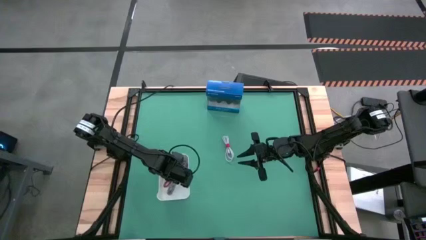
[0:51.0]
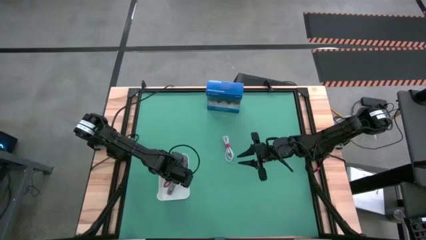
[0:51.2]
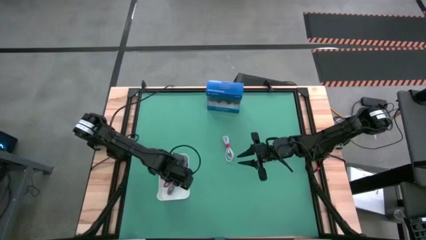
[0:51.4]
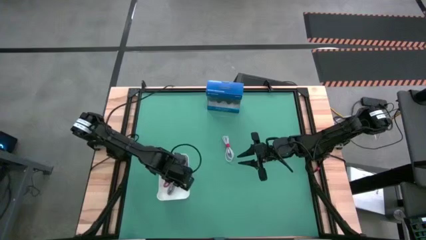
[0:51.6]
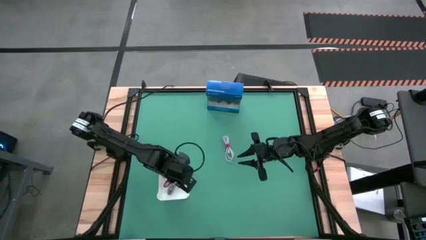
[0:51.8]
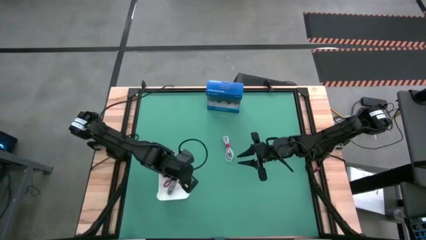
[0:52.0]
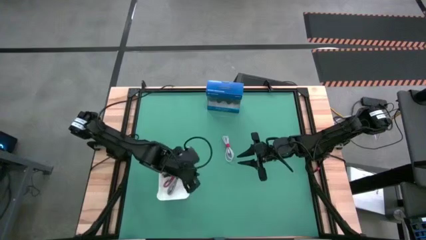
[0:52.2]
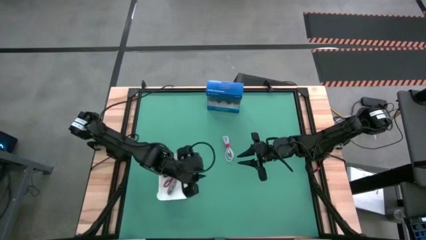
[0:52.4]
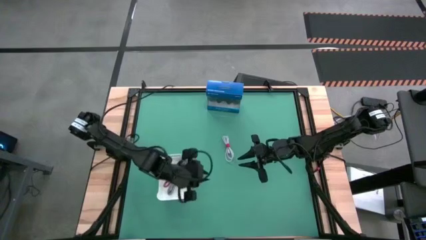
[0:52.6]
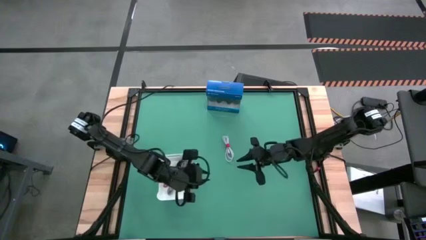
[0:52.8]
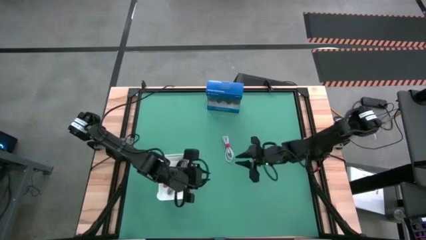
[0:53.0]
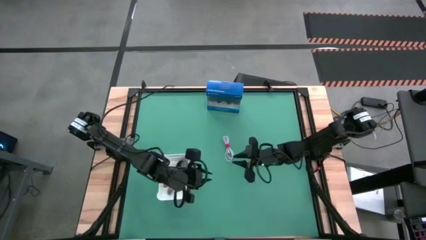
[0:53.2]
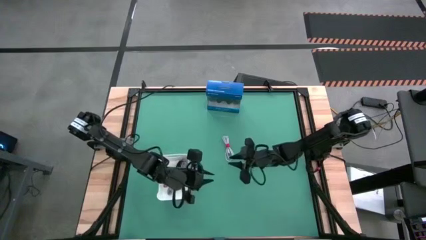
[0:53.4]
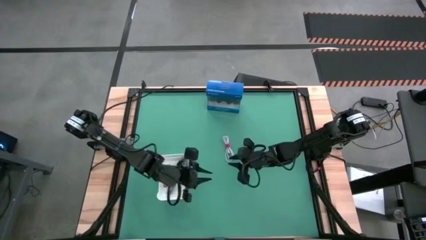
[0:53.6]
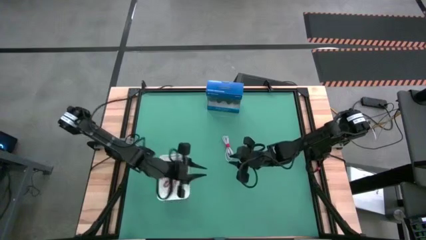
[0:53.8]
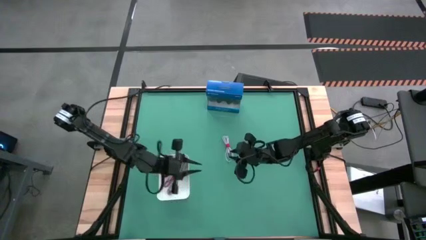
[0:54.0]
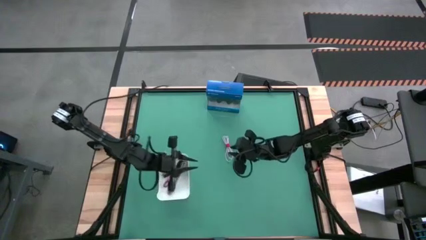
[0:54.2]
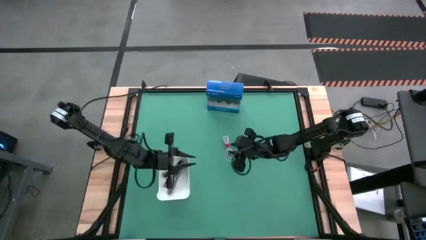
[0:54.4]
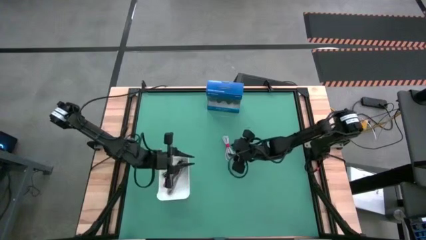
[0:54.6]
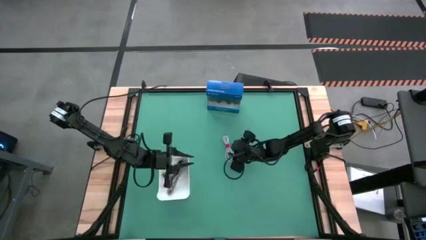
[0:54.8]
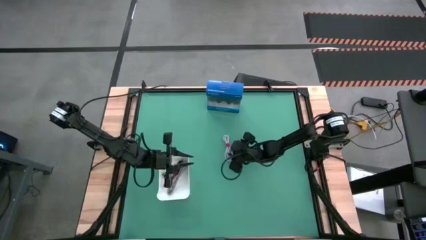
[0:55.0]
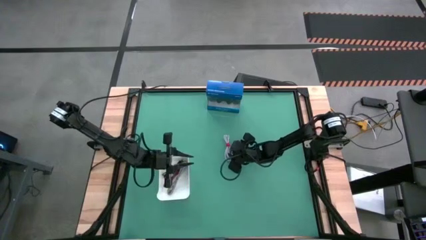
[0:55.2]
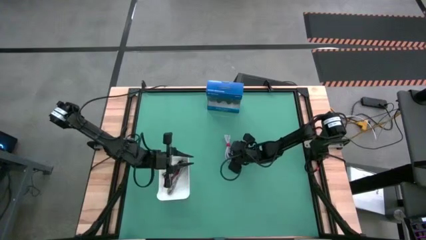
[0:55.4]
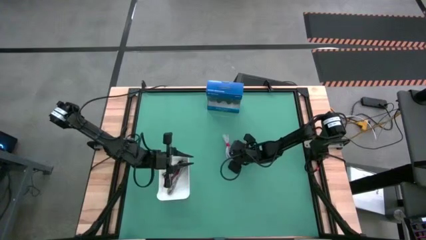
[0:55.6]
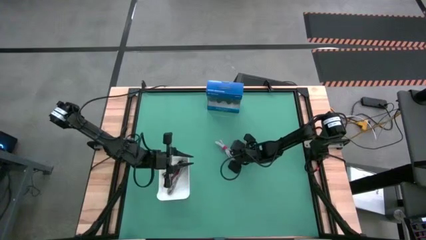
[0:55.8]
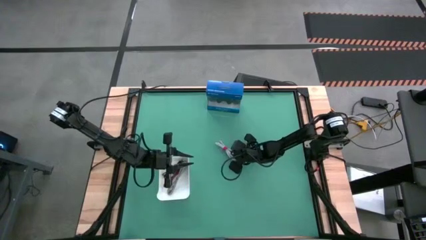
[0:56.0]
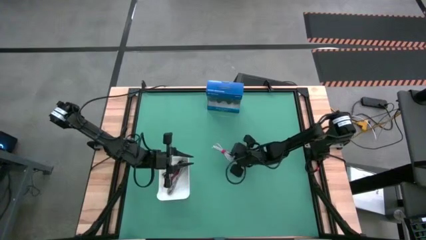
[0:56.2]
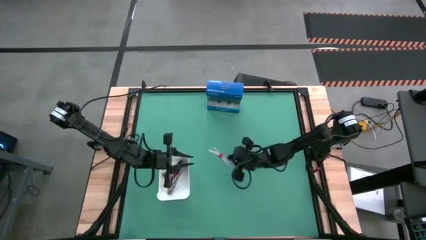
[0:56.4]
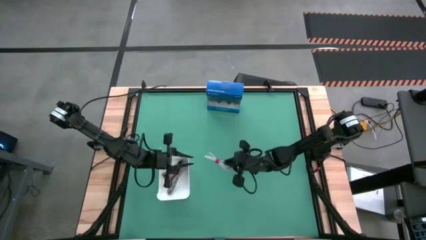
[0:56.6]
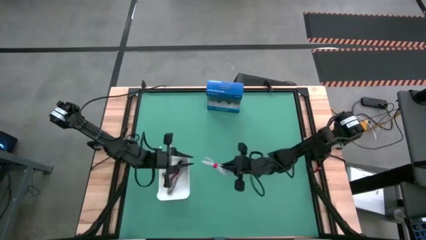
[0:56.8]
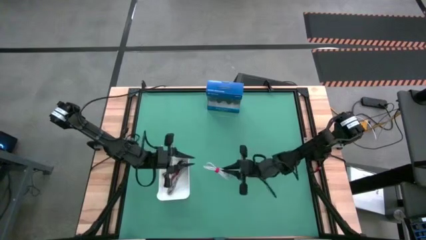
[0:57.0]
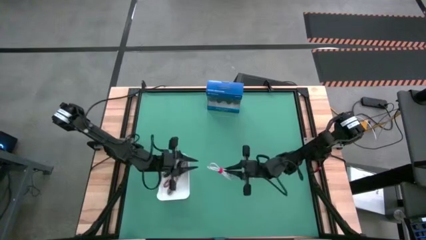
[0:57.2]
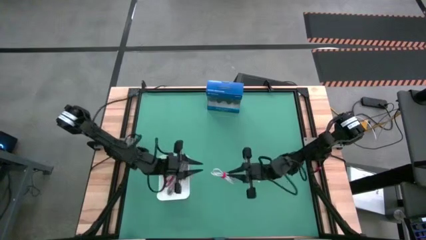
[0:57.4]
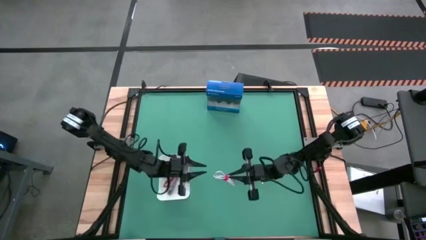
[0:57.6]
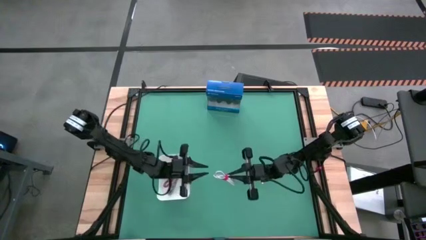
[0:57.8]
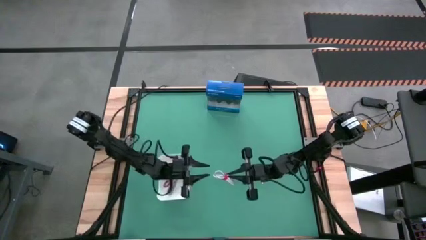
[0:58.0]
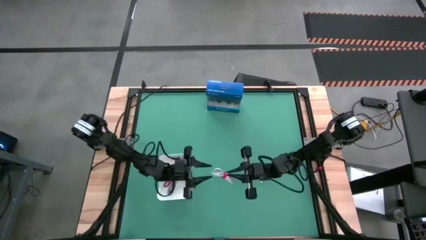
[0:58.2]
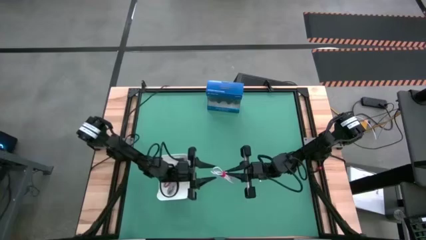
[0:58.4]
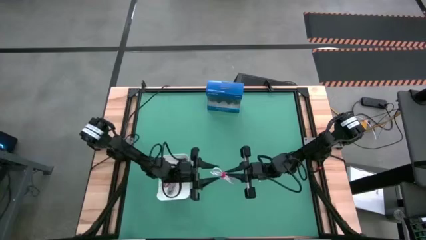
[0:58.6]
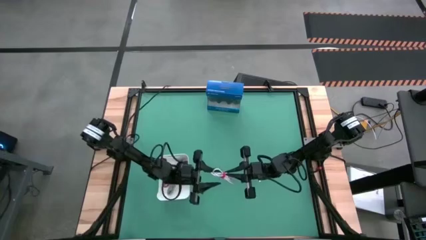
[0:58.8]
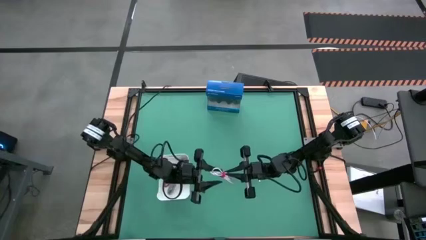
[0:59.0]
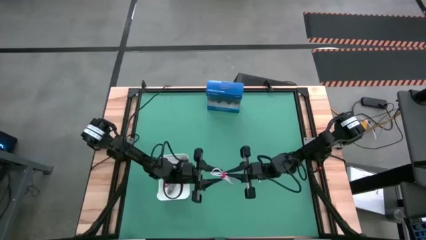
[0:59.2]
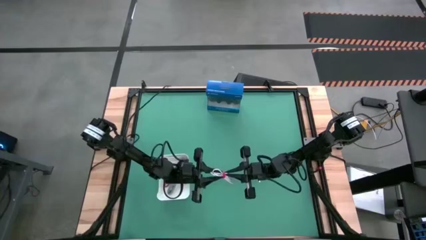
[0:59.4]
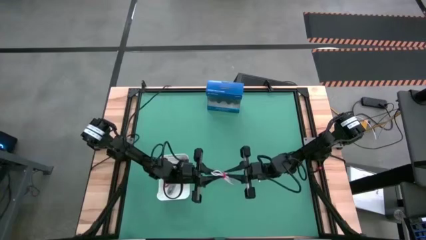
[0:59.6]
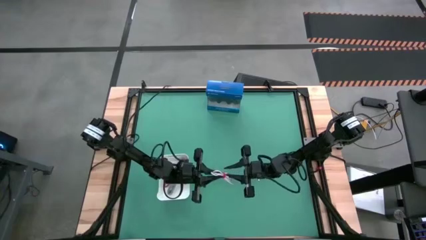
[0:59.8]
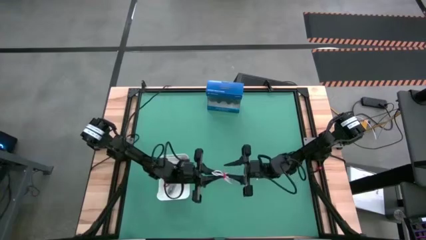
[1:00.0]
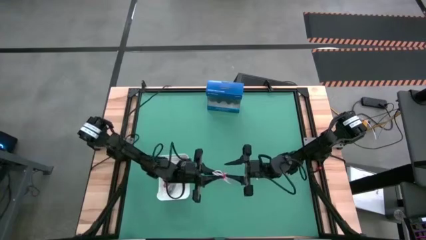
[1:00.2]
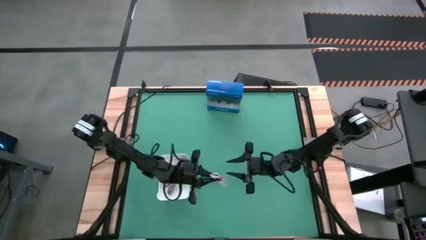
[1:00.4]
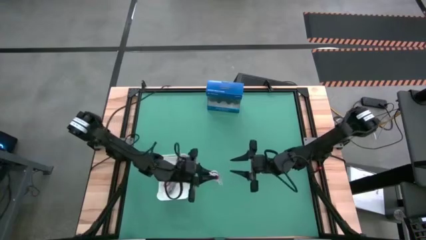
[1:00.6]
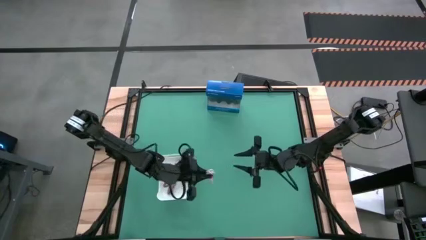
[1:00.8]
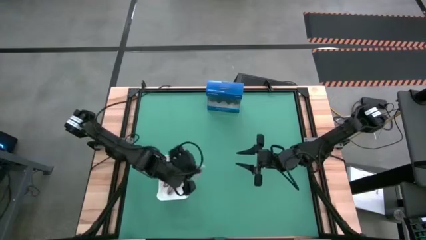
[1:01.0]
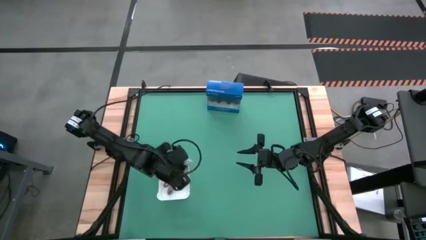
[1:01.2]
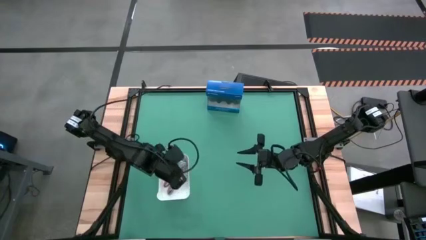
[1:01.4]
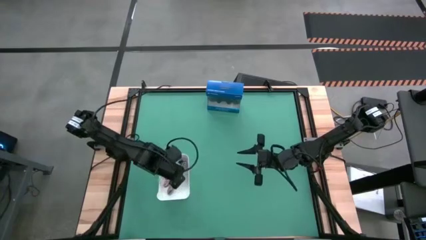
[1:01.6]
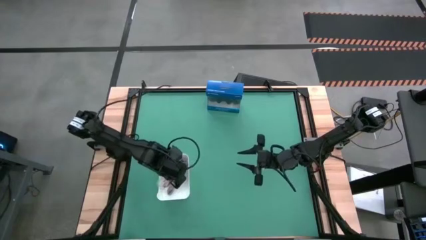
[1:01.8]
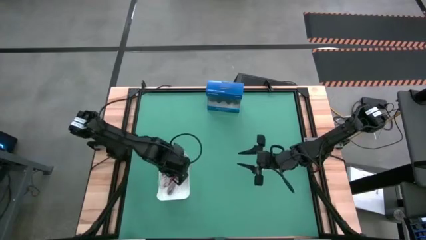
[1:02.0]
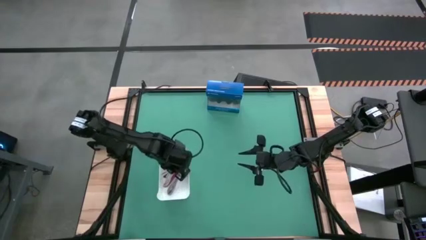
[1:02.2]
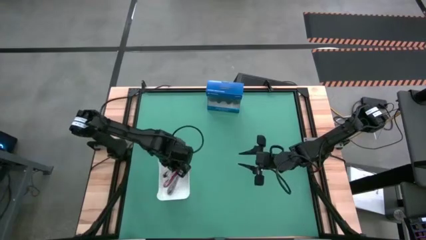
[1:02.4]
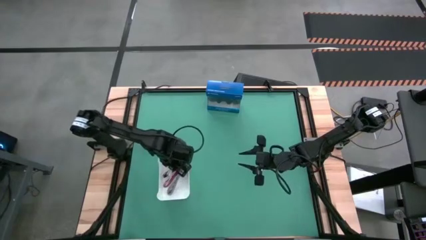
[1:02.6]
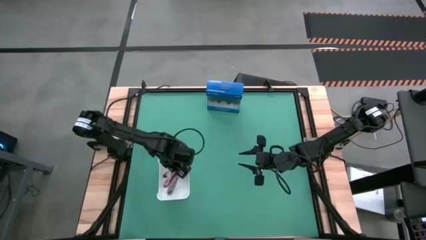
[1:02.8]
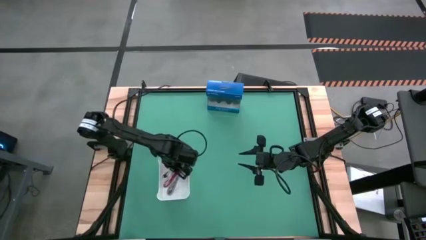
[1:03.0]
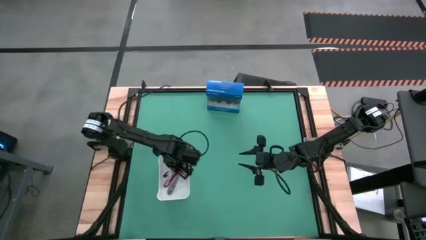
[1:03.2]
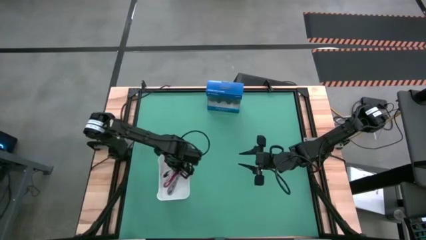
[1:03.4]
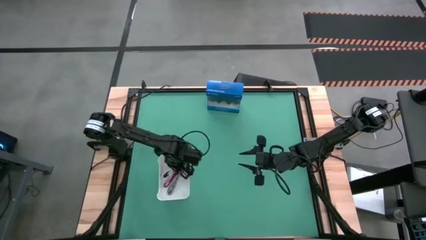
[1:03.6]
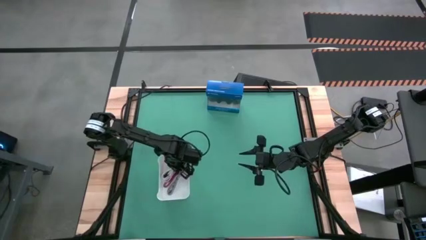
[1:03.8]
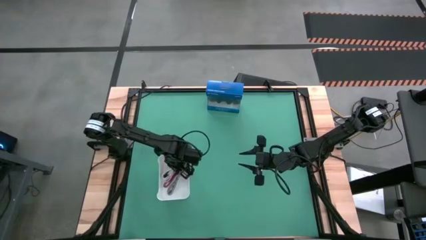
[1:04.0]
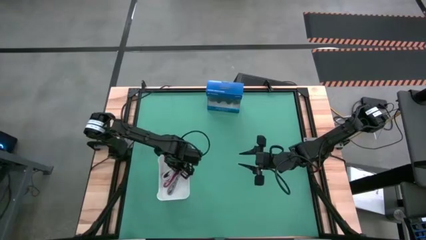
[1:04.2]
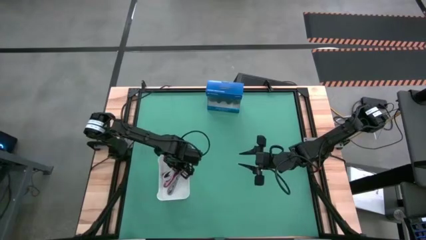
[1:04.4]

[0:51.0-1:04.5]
Task: Pick and place USB-C Cables
Put the white charger cable into the white bin
